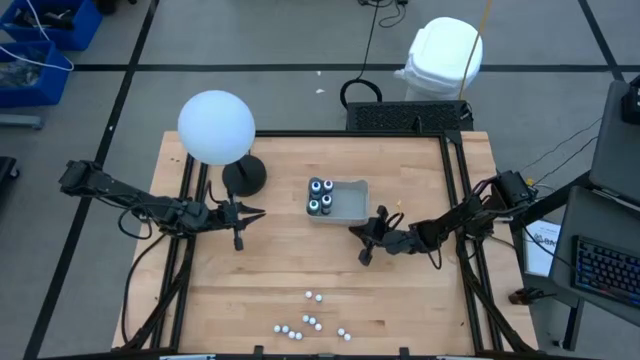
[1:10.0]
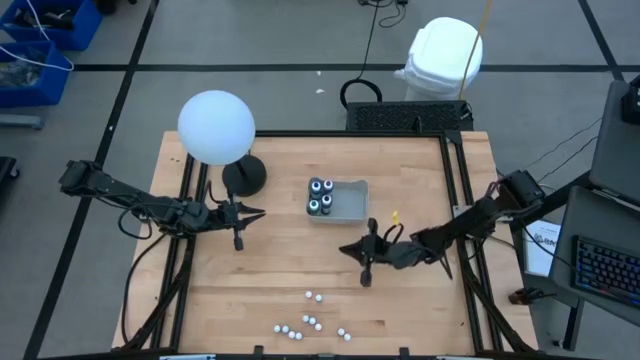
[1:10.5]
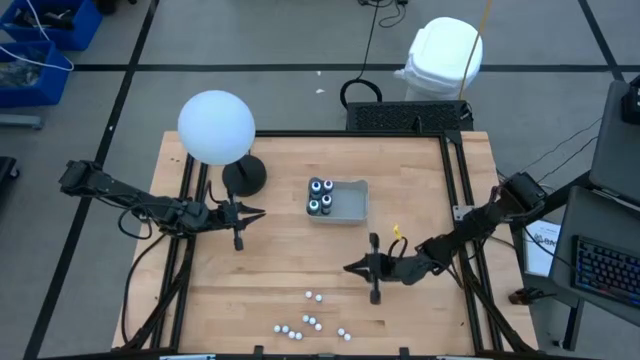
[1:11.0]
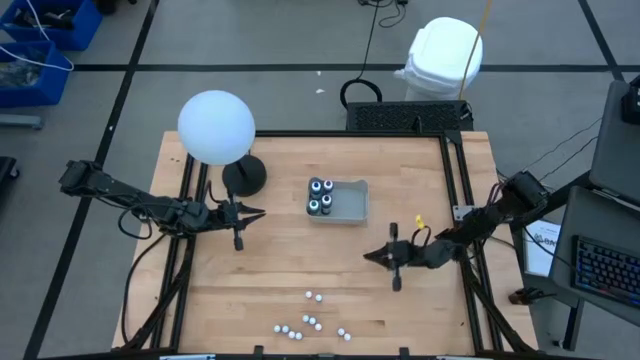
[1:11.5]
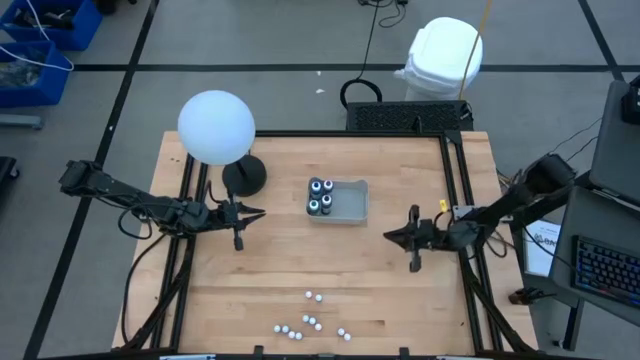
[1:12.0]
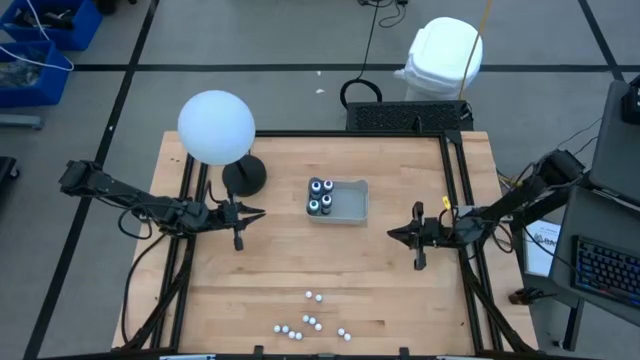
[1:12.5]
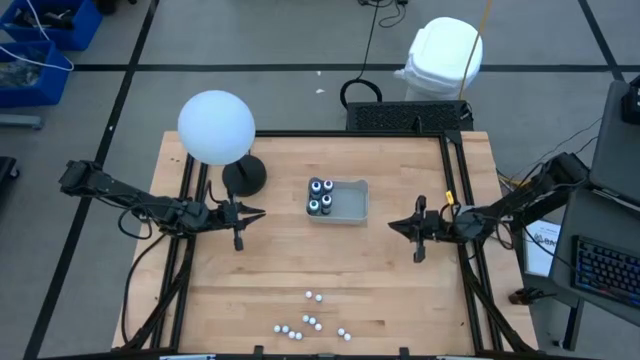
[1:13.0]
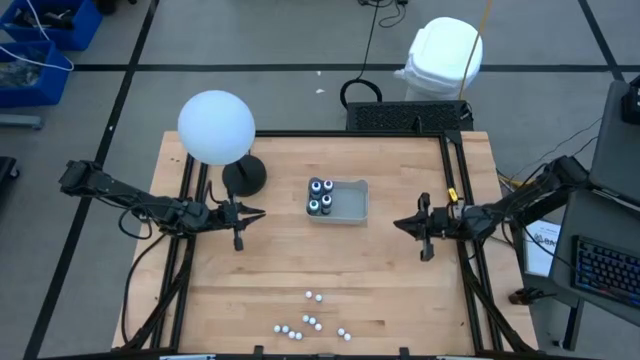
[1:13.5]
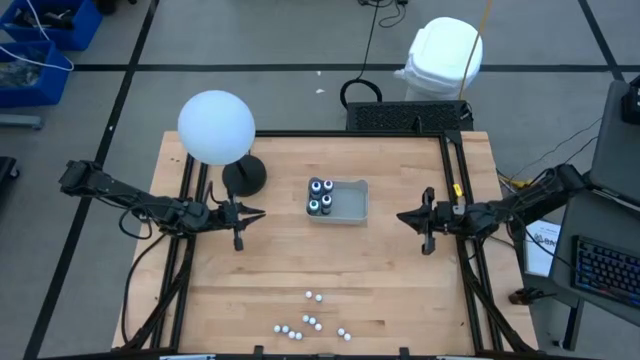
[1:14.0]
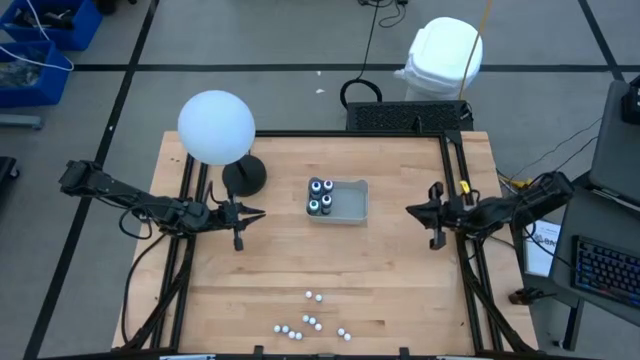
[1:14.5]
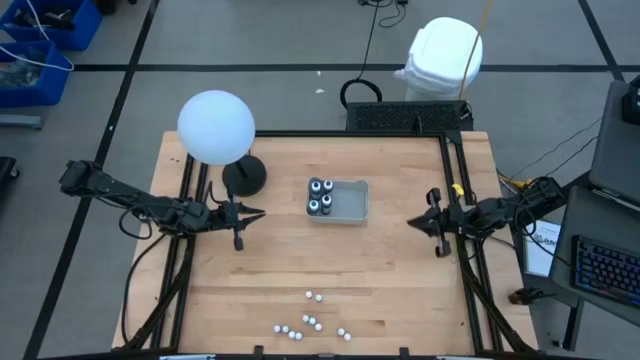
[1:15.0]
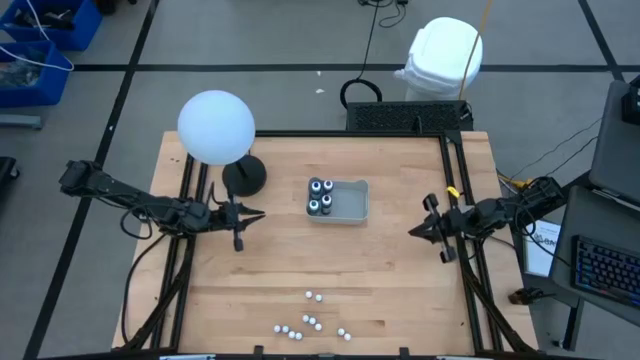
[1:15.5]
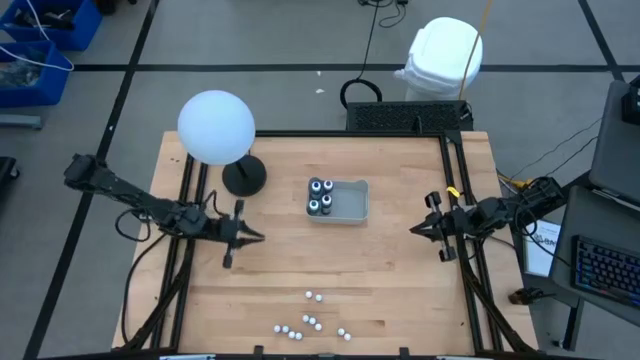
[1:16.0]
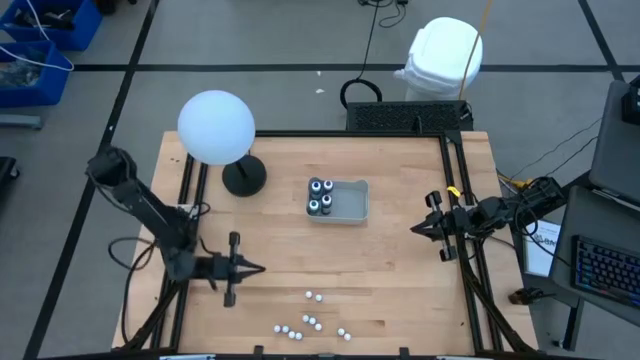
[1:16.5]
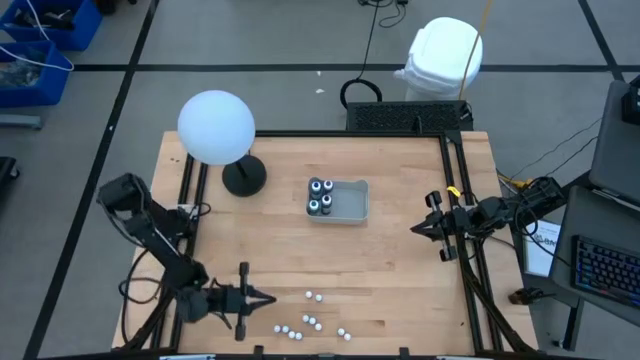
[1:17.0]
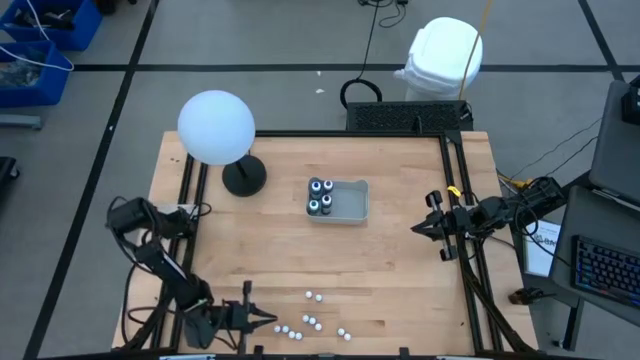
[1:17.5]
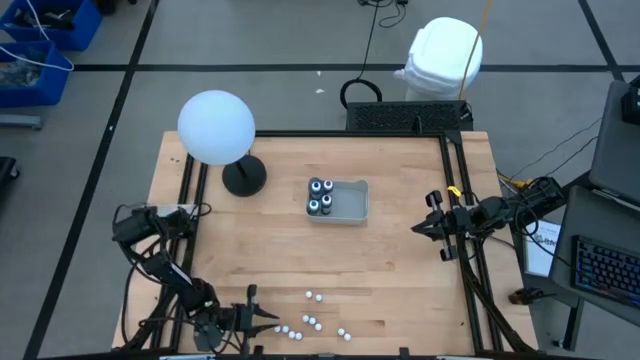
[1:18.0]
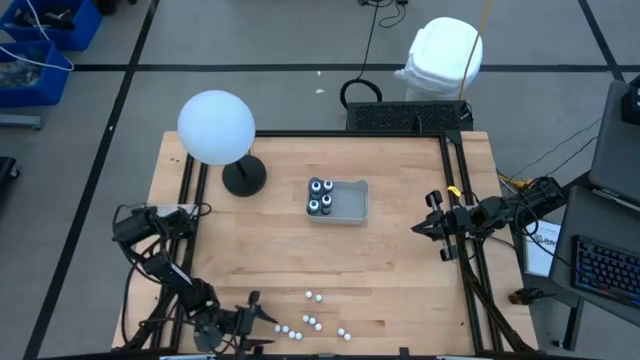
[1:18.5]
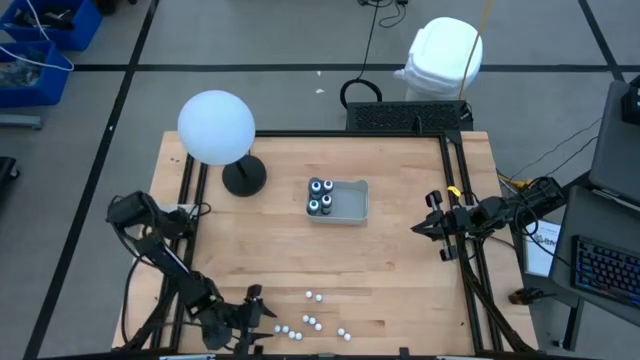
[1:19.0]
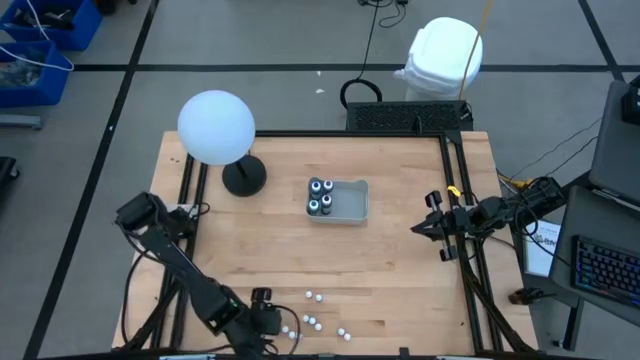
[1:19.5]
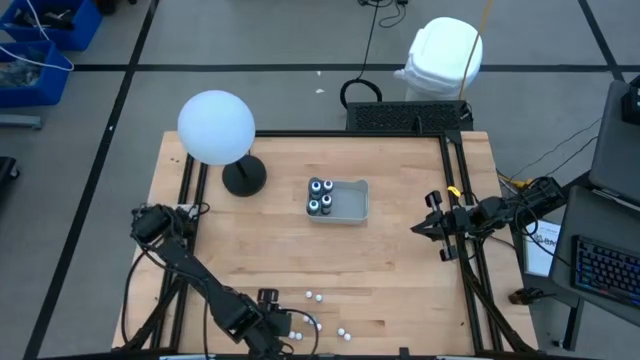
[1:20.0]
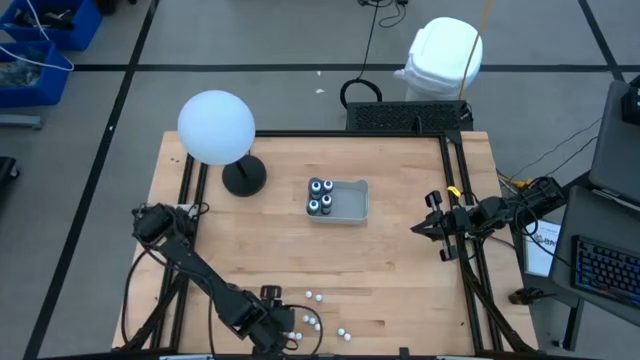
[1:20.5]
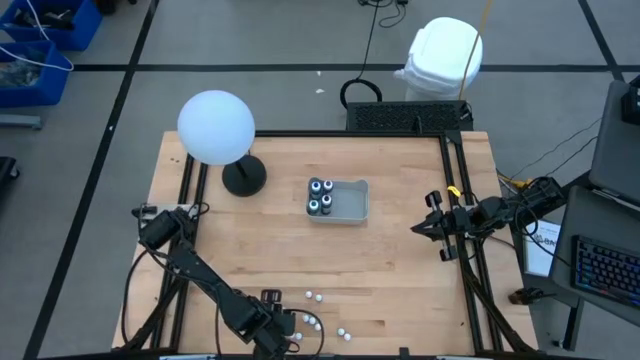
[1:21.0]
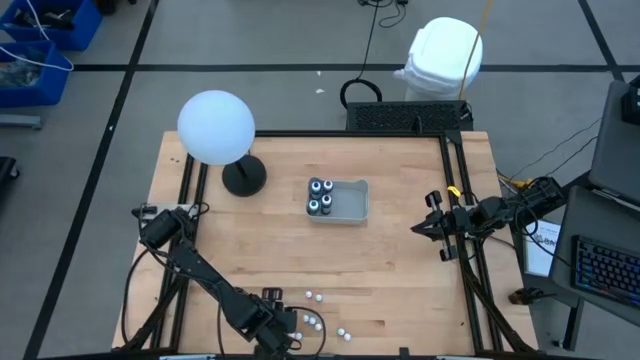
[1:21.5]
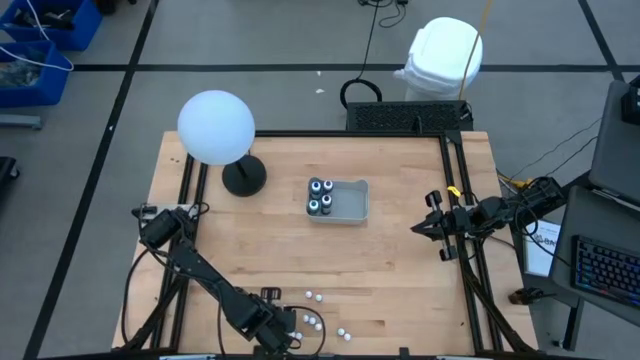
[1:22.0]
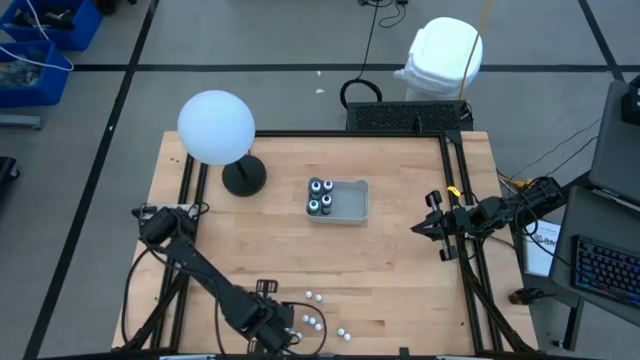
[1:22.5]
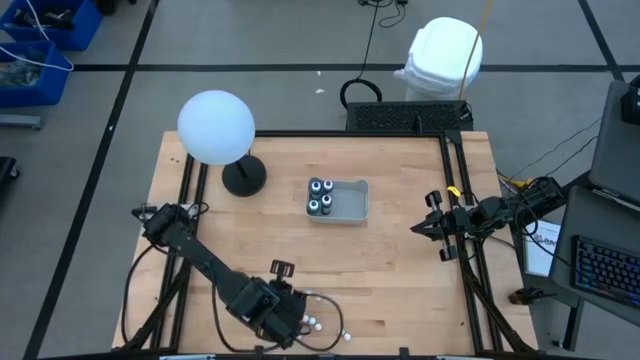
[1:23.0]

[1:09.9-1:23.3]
Task: Pick & Place food coloring
Put the left small purple food coloring bottle into the gray bin

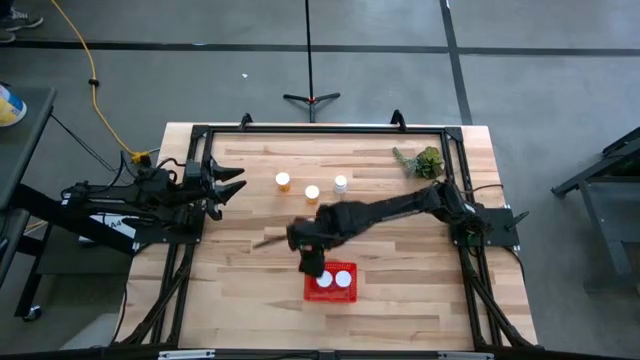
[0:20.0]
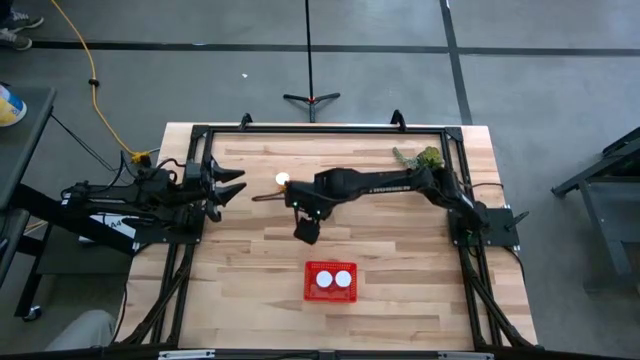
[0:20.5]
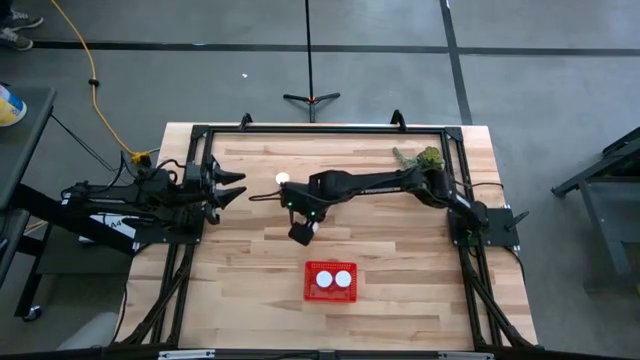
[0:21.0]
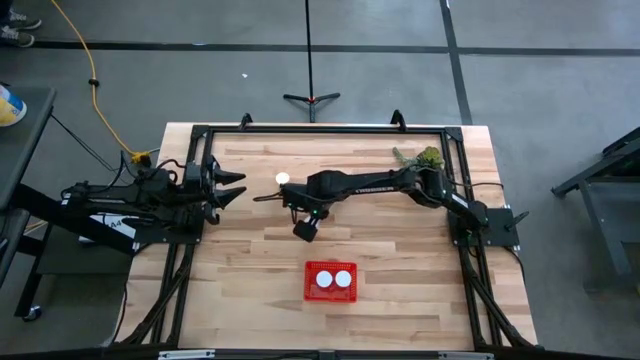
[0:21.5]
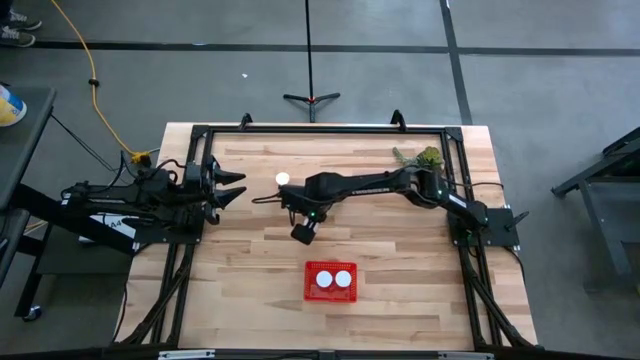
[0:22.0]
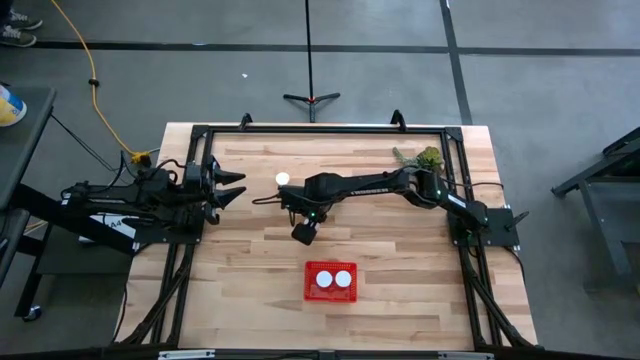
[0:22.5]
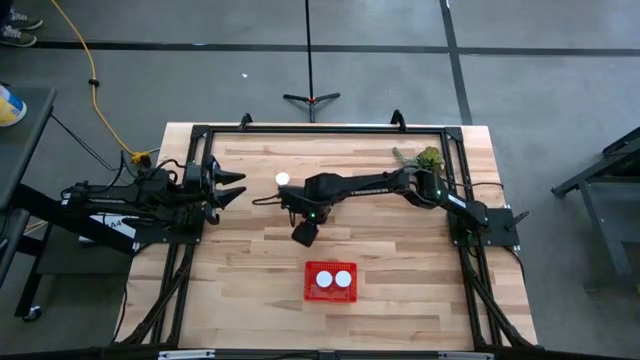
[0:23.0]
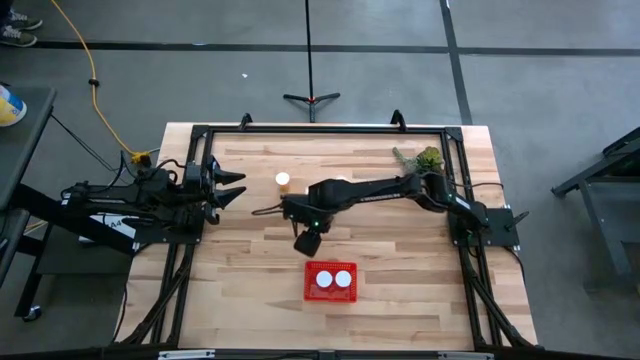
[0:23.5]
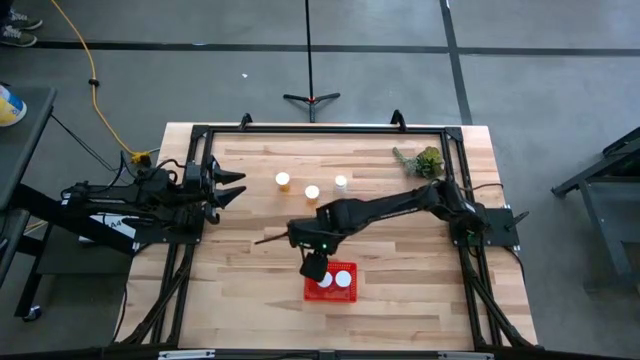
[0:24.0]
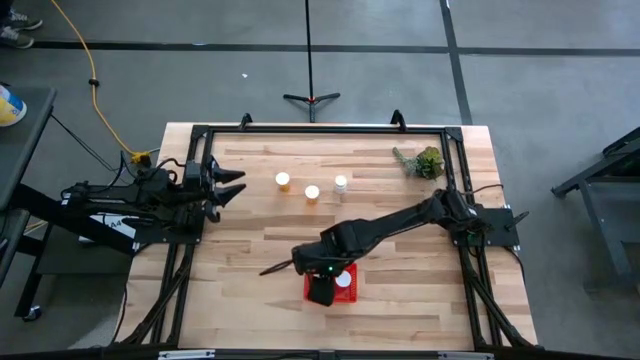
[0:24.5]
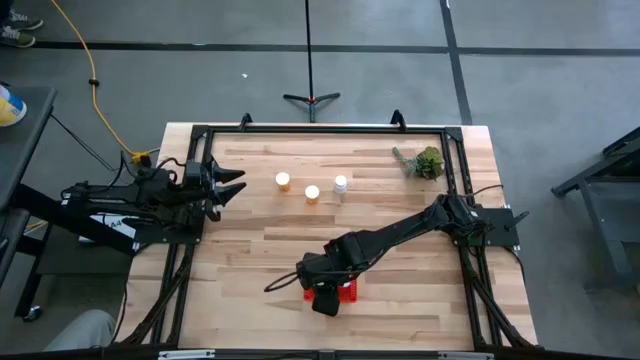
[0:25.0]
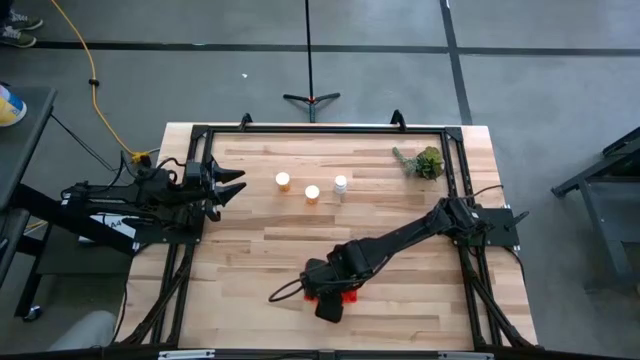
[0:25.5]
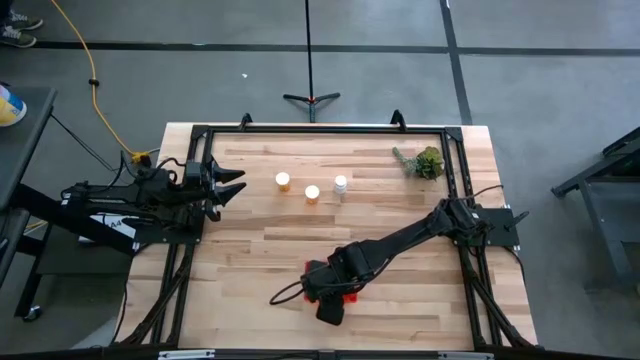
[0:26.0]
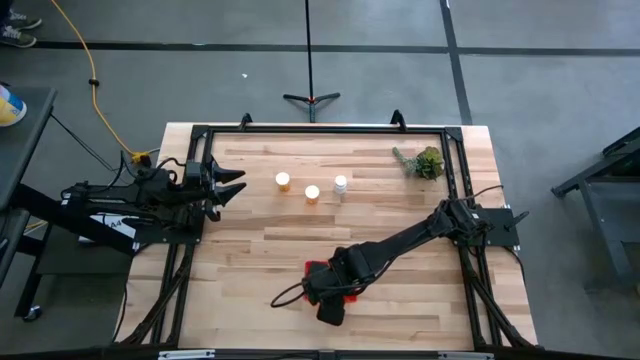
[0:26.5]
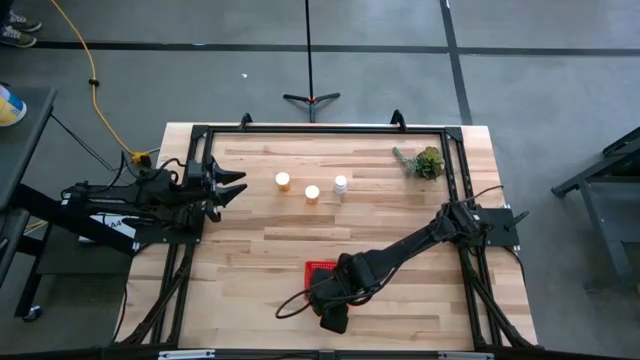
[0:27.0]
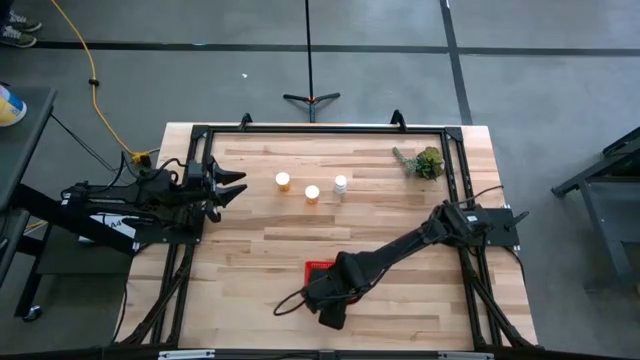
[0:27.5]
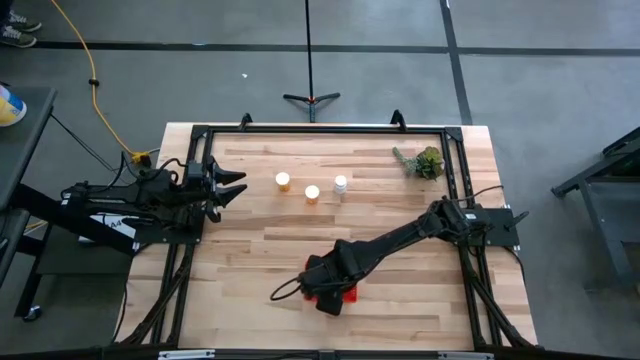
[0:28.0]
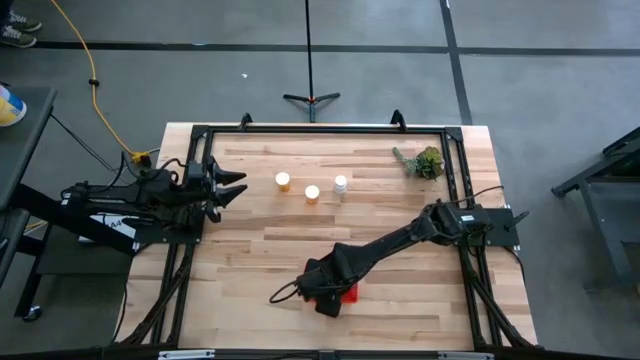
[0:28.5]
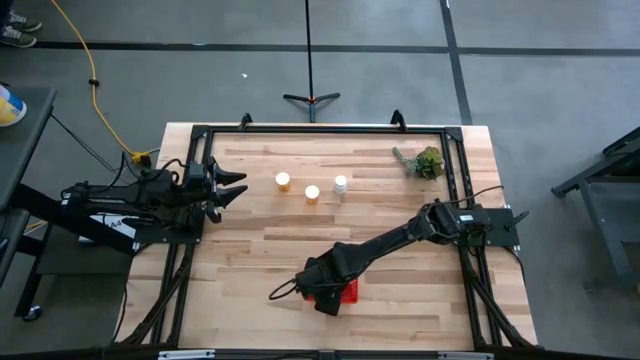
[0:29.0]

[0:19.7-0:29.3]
Task: Pick and place pill bottles into a basket
Put the orange pill bottle into the red basket
